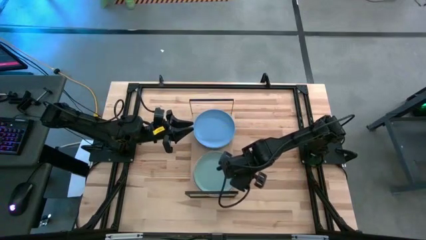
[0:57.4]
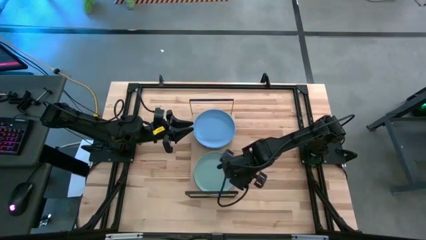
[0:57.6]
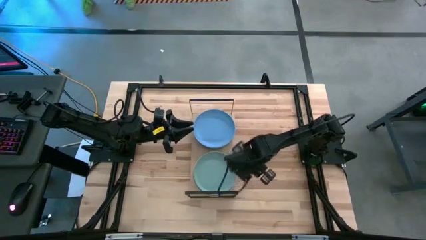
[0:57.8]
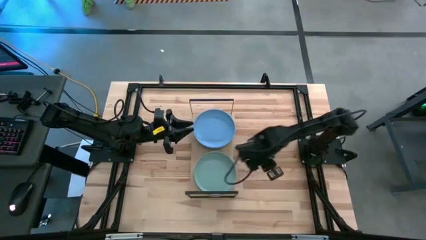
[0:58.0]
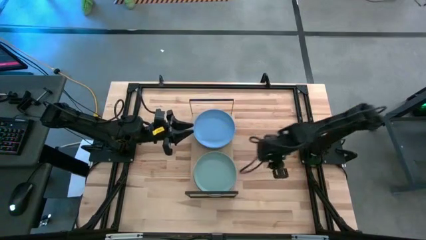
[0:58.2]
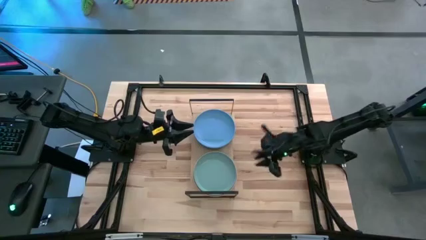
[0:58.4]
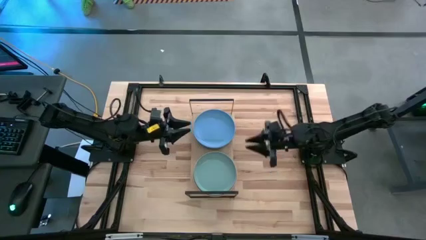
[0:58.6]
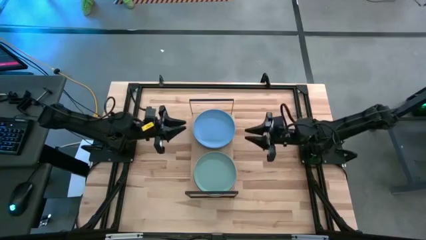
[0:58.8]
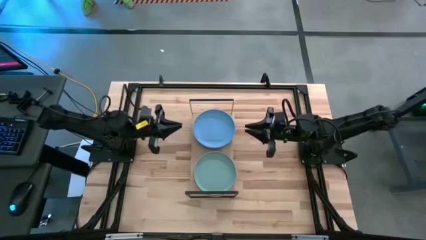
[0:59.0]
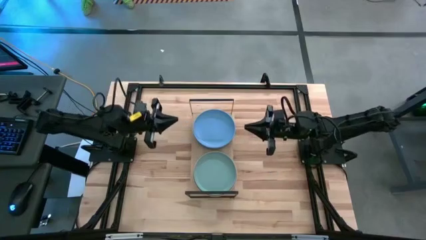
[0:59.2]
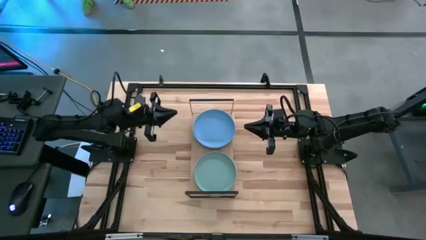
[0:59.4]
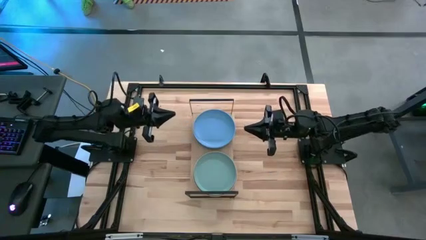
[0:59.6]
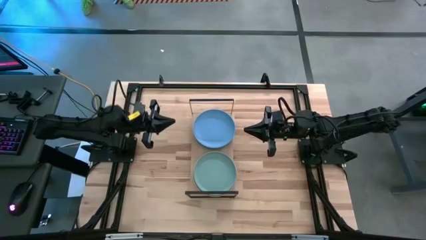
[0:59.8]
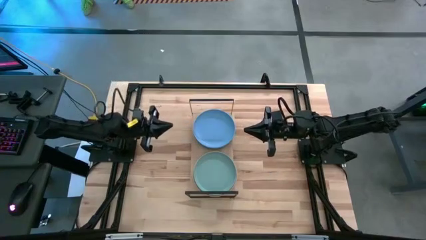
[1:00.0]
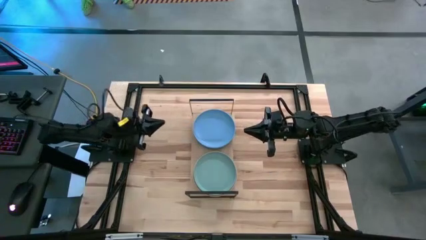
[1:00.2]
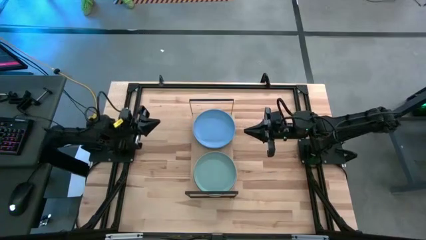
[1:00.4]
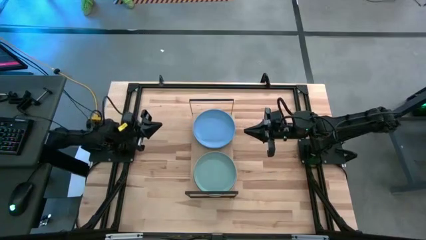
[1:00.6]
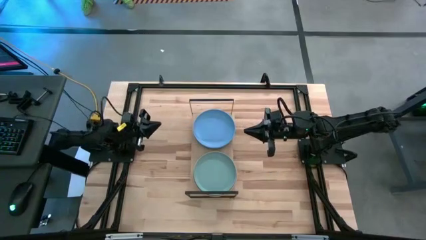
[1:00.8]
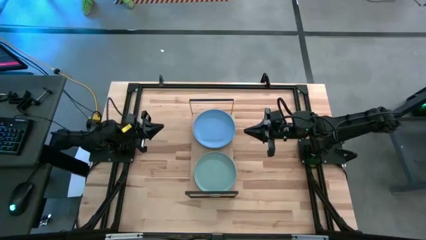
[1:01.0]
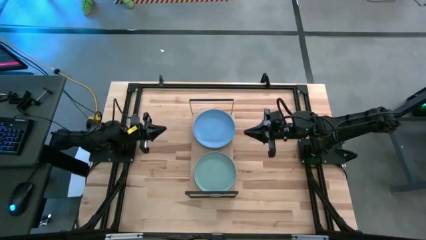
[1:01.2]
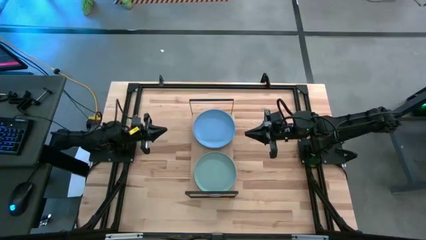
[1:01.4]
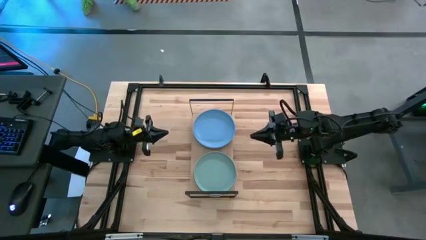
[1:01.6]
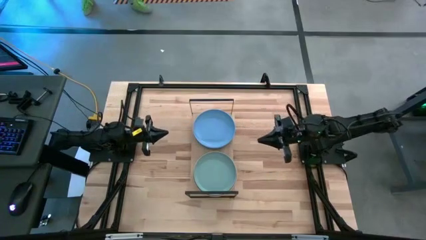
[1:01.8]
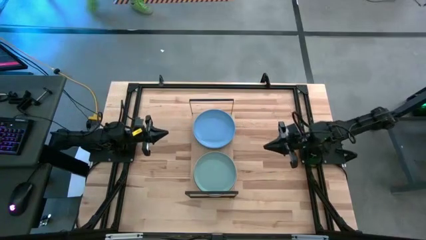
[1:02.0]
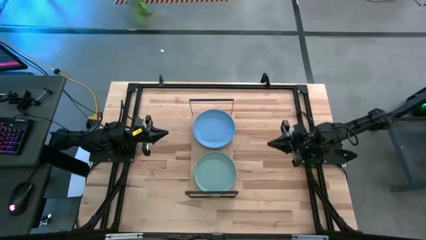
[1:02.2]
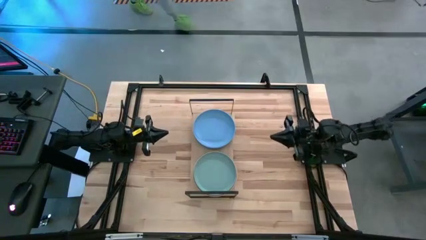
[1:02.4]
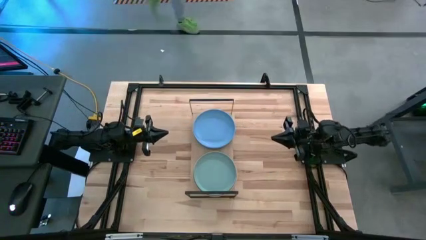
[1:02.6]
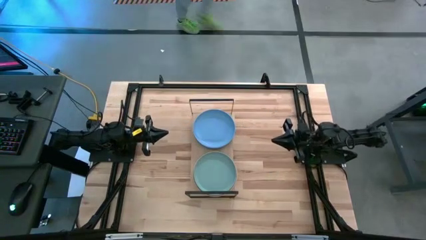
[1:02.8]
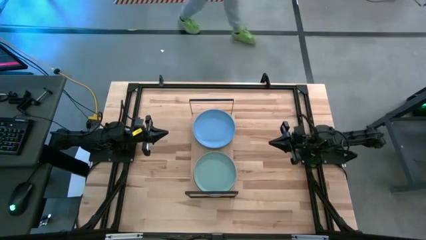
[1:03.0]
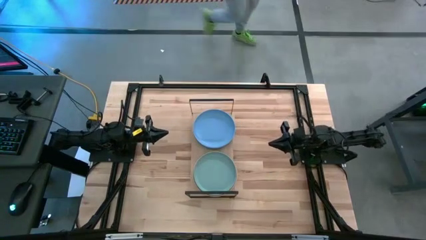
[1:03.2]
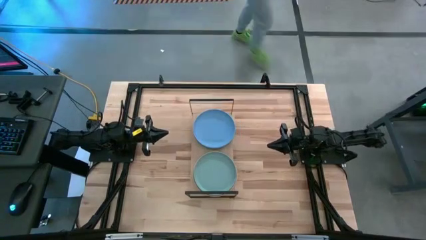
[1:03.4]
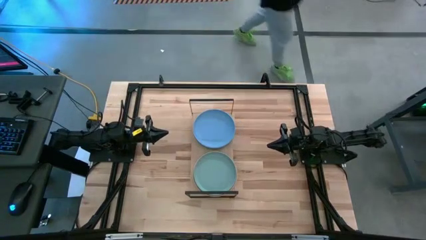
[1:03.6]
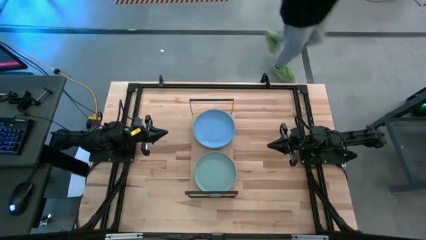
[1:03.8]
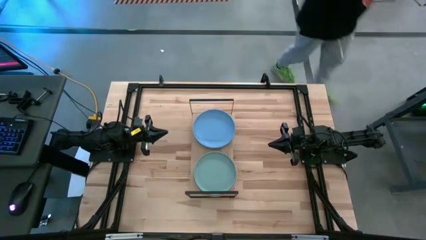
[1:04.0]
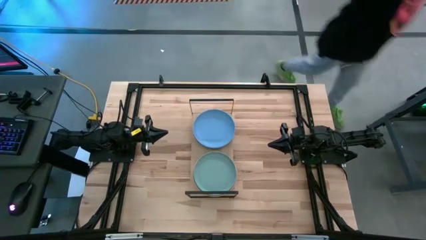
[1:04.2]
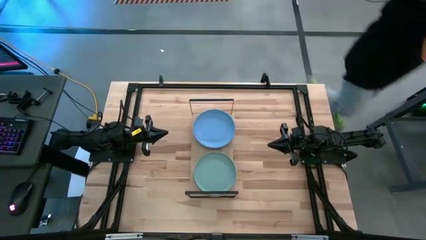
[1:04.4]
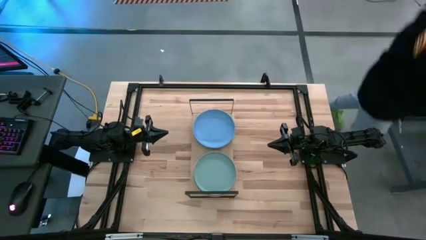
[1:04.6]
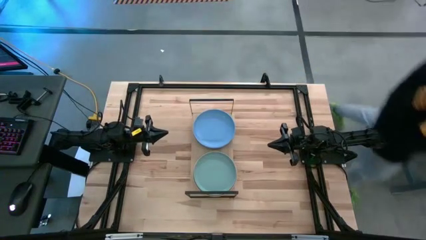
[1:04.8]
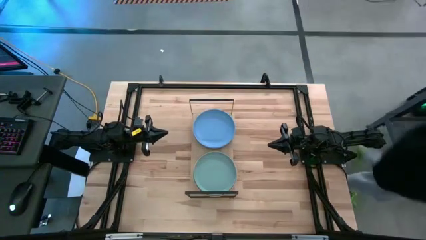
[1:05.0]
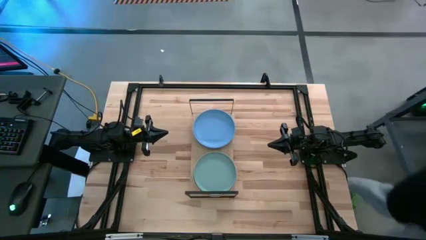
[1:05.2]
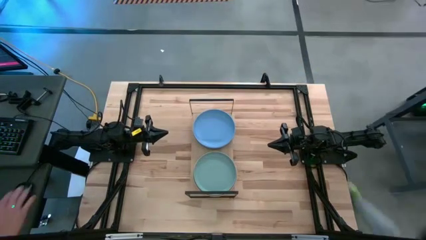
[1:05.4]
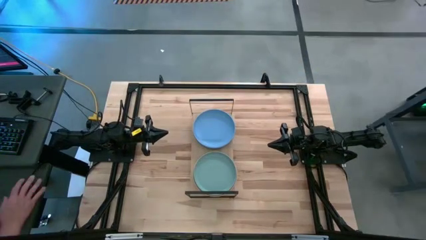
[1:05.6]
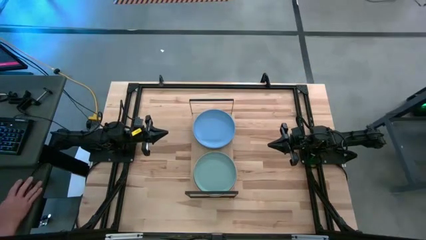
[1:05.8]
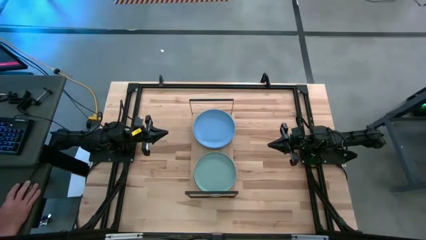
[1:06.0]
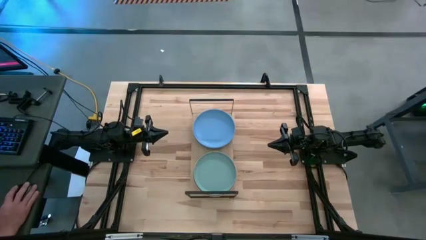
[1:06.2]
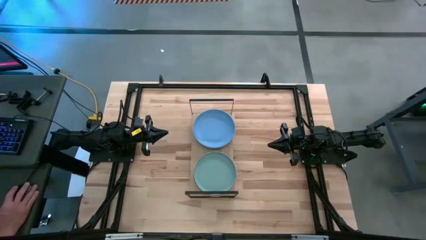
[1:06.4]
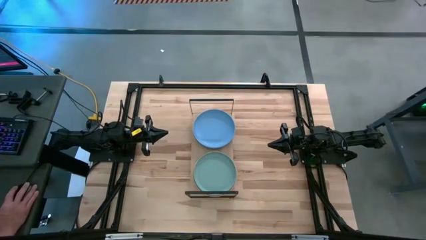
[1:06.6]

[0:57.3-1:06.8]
Task: Place and stack plates onto a shelf
Return to Home Position
